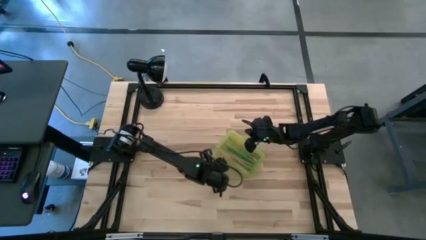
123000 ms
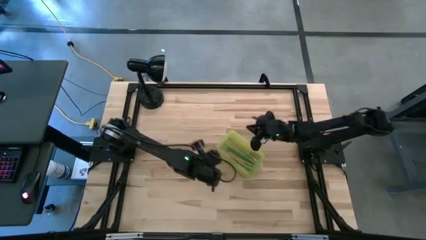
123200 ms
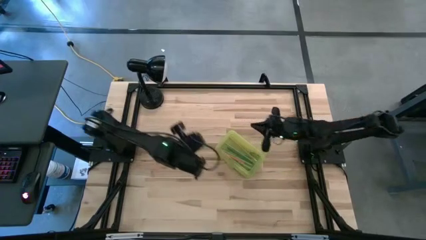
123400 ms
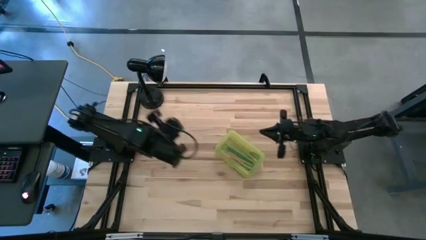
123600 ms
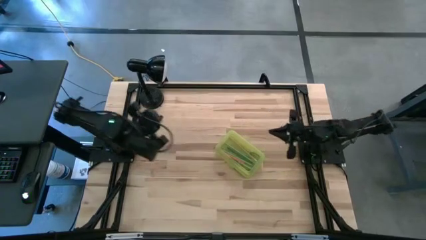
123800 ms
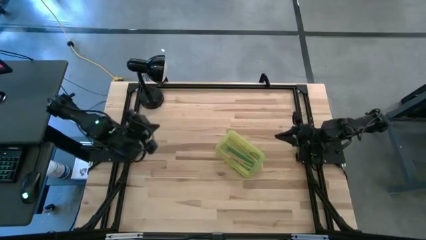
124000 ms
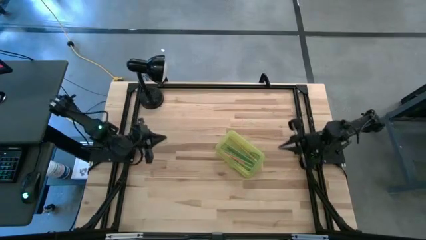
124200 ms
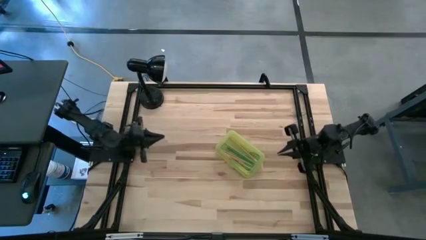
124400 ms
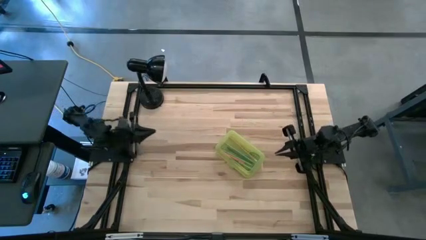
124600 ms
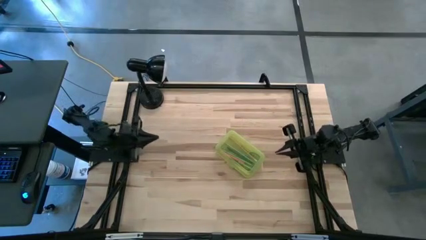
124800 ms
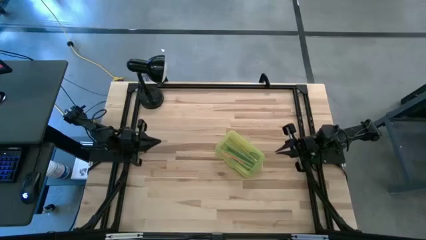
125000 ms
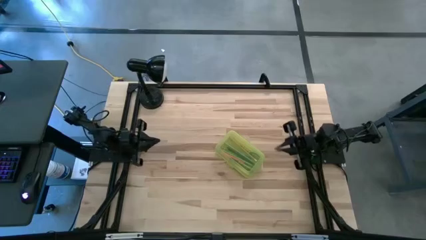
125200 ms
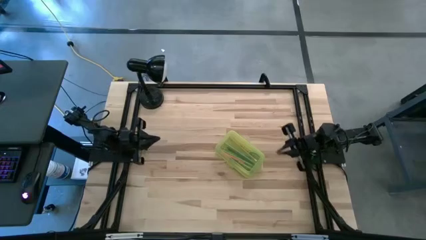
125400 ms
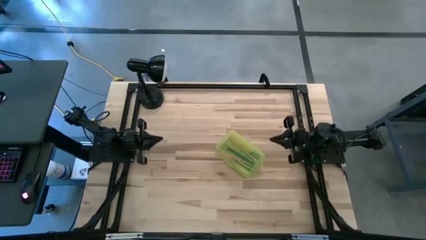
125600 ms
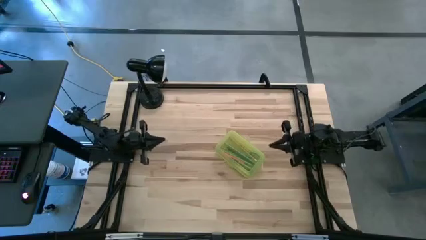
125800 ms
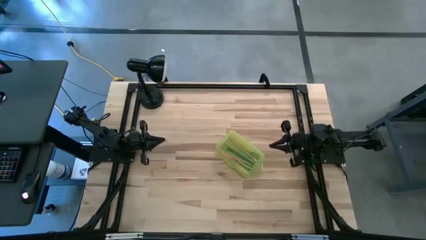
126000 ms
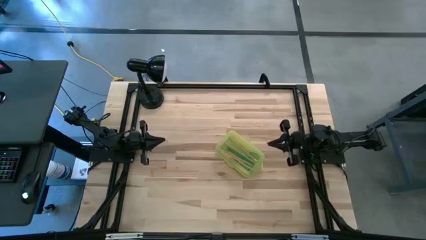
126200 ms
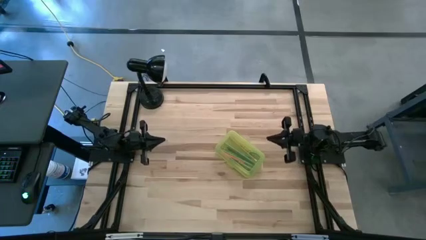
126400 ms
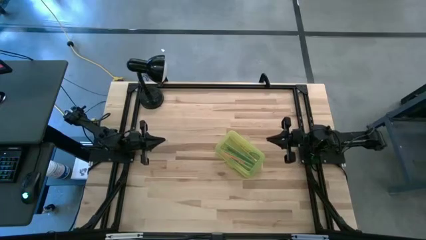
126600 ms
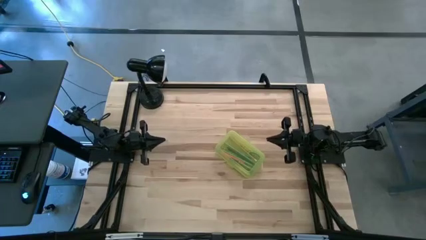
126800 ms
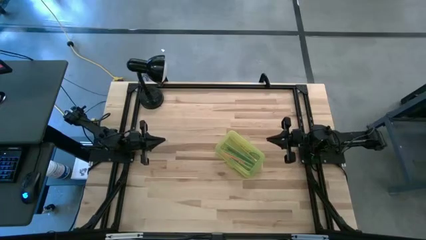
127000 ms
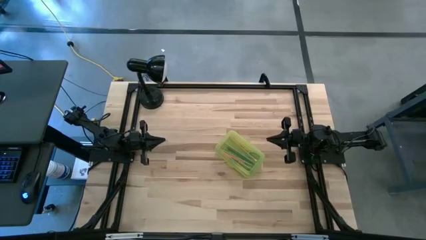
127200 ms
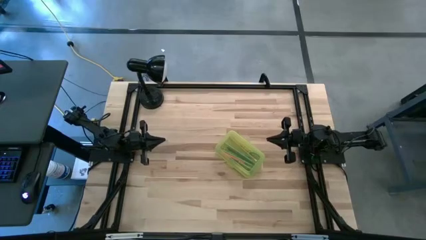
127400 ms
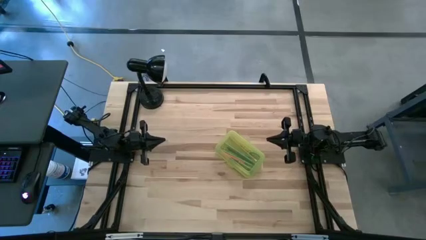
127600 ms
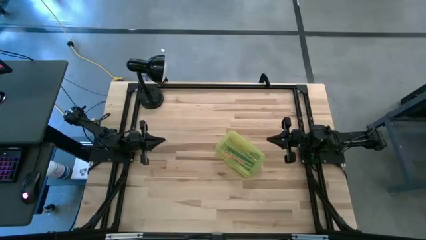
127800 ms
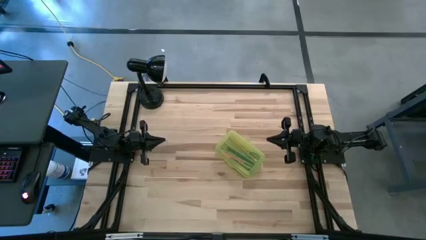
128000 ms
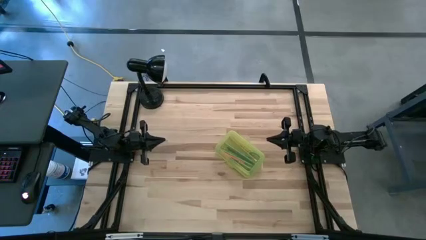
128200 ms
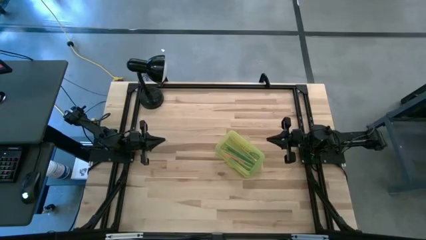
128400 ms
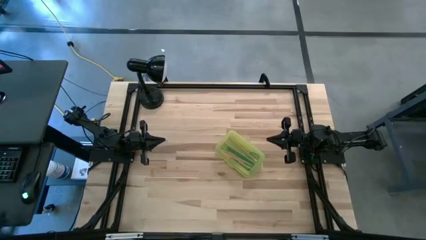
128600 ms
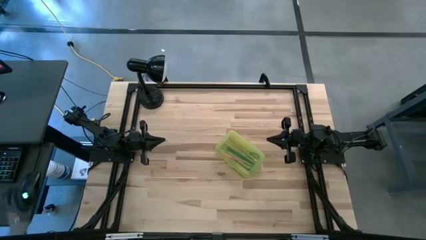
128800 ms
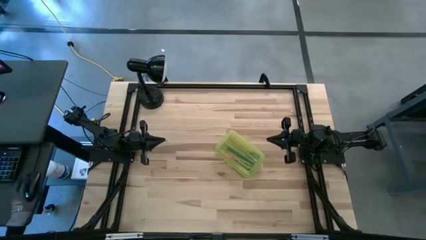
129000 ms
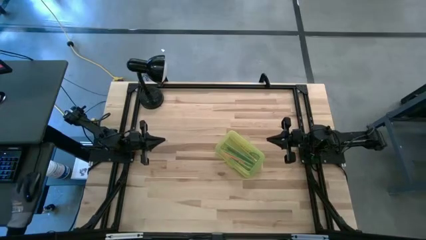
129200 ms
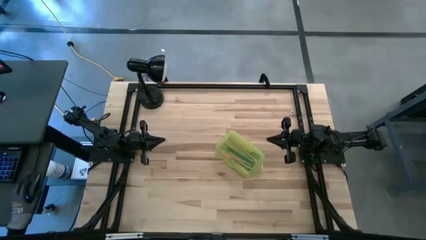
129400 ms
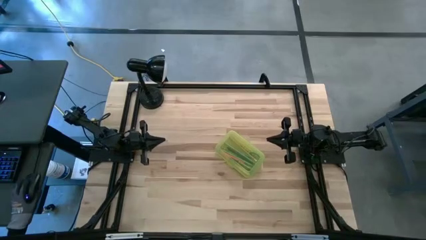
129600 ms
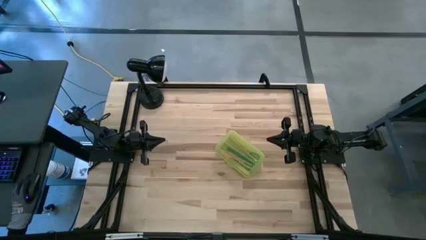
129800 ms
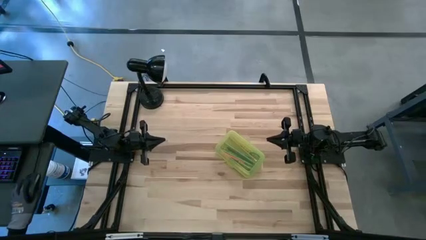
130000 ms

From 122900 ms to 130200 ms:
Task: Pick & place school supplies into a supply box
Return to Home Position

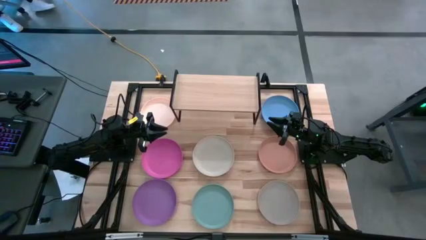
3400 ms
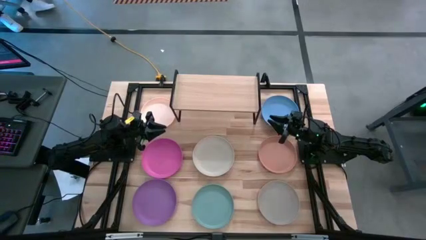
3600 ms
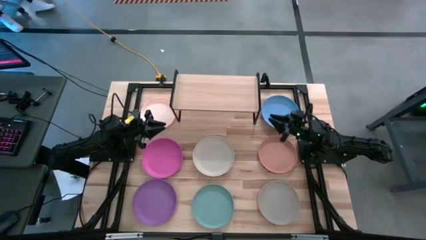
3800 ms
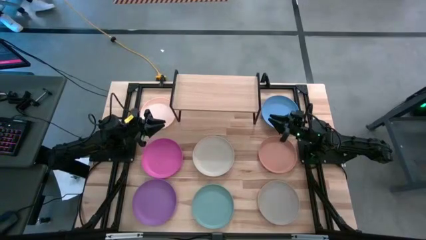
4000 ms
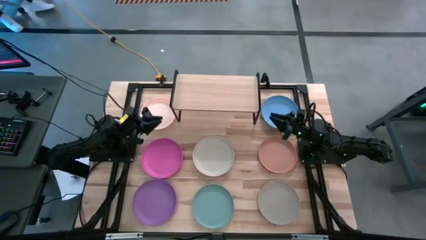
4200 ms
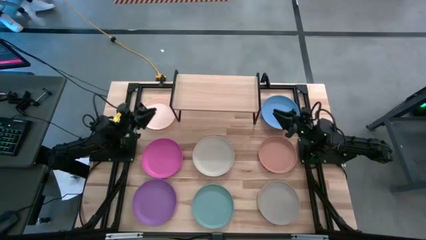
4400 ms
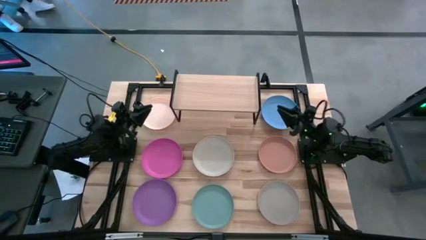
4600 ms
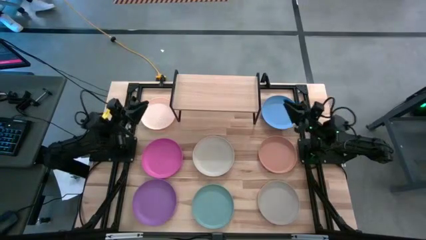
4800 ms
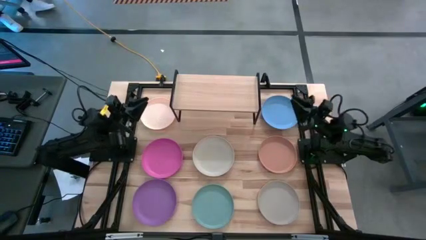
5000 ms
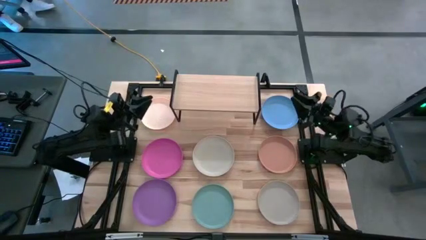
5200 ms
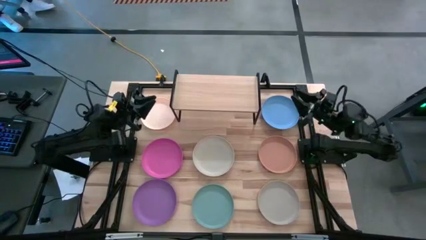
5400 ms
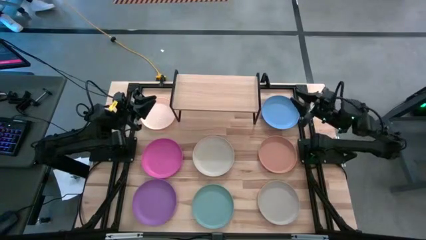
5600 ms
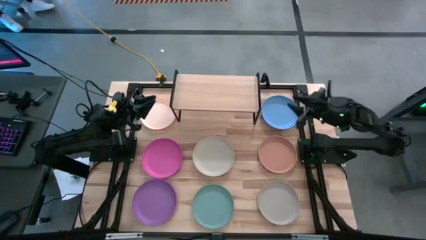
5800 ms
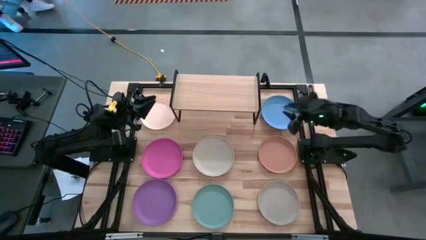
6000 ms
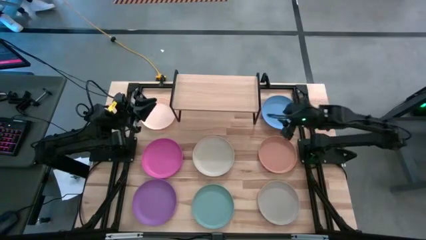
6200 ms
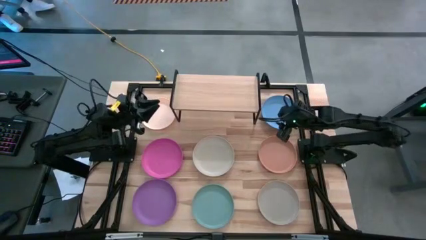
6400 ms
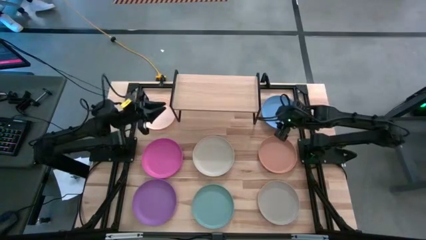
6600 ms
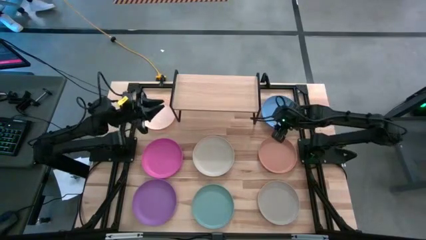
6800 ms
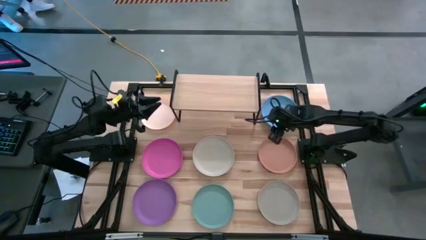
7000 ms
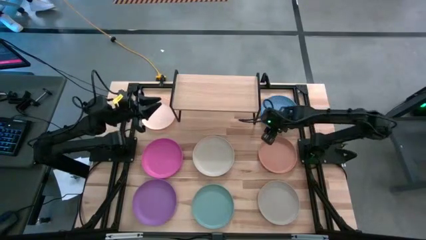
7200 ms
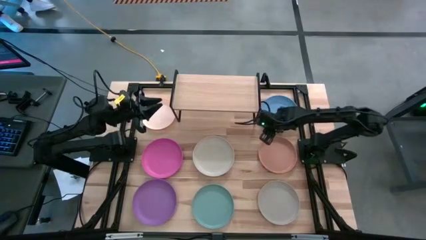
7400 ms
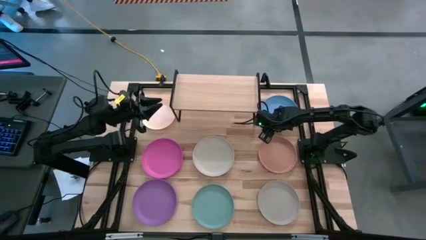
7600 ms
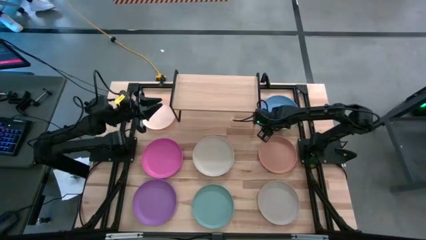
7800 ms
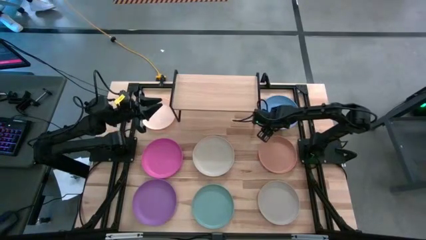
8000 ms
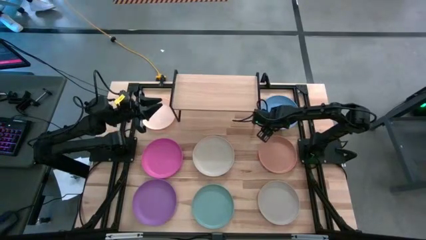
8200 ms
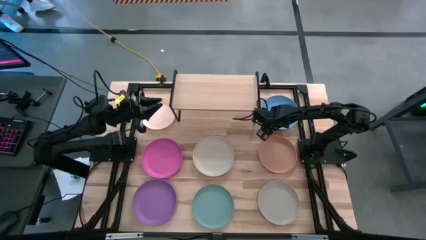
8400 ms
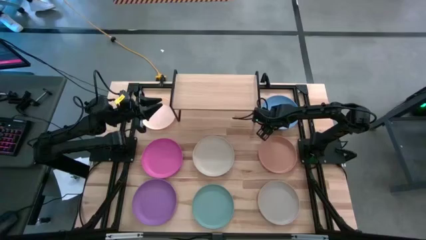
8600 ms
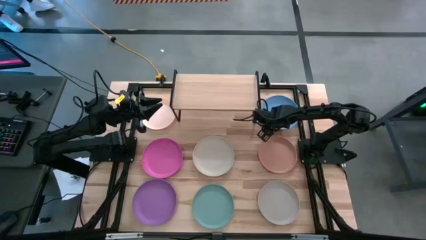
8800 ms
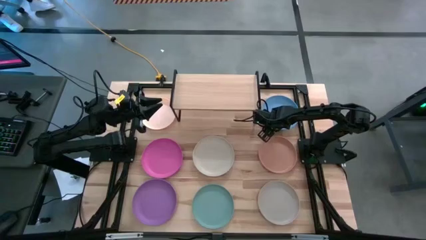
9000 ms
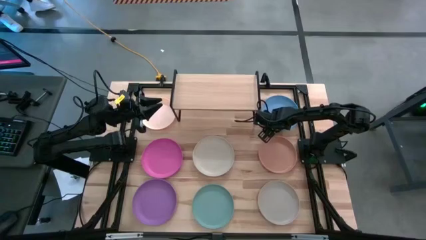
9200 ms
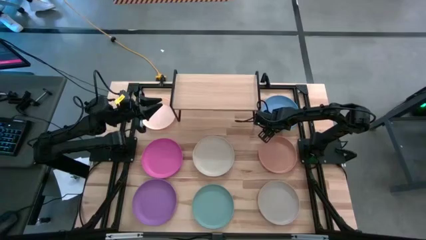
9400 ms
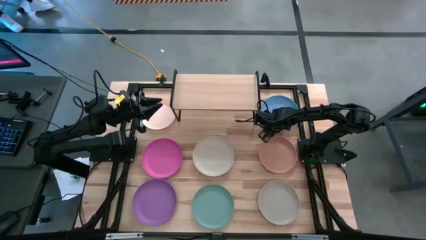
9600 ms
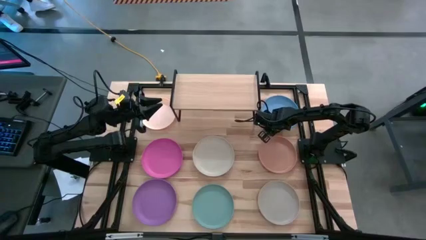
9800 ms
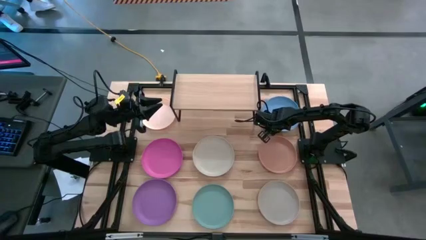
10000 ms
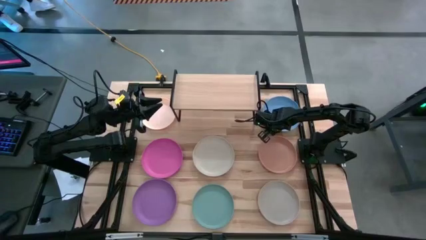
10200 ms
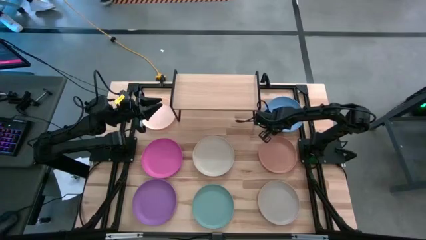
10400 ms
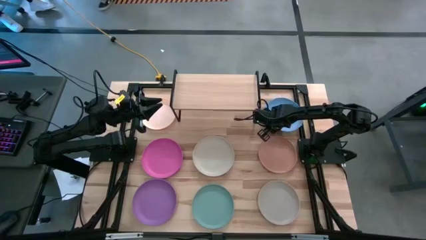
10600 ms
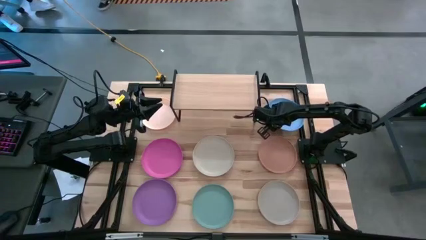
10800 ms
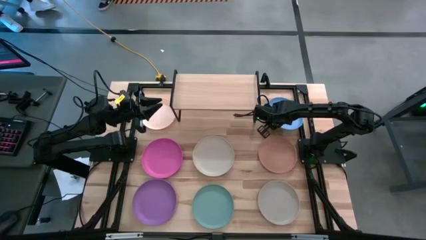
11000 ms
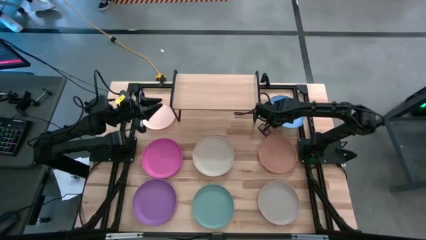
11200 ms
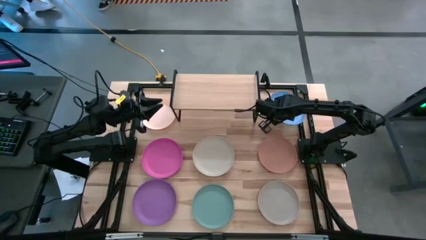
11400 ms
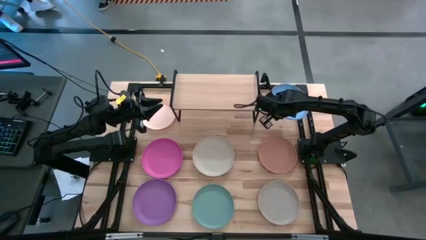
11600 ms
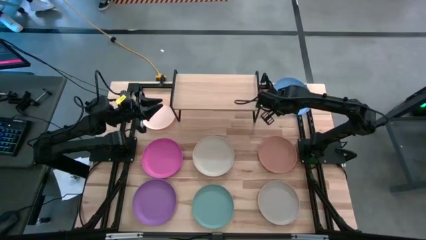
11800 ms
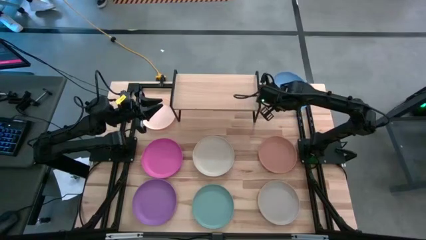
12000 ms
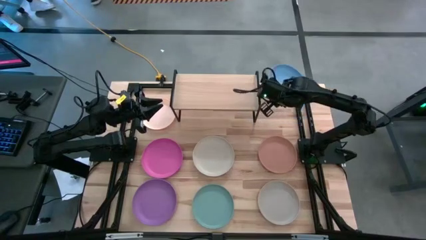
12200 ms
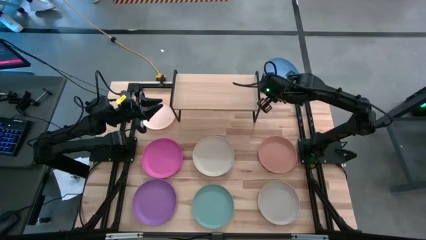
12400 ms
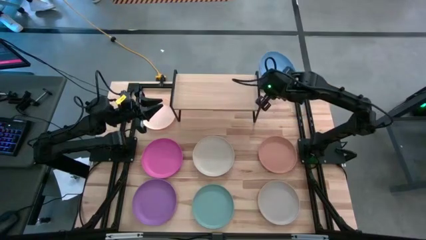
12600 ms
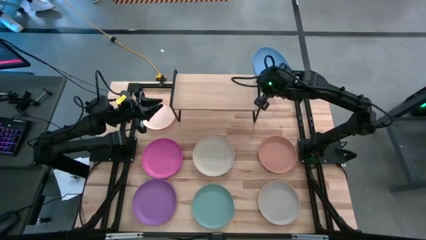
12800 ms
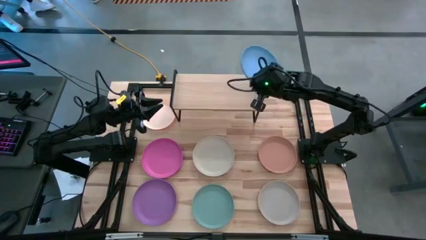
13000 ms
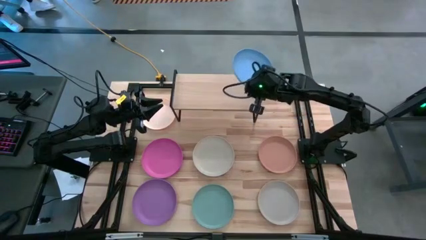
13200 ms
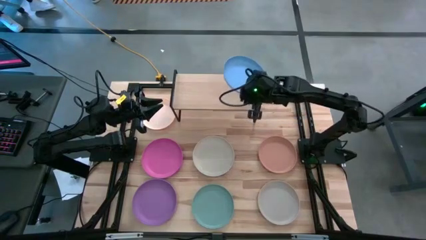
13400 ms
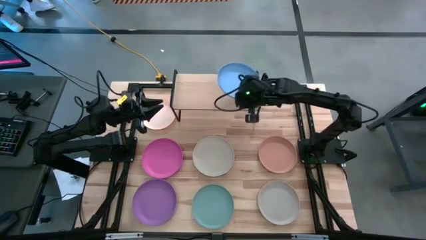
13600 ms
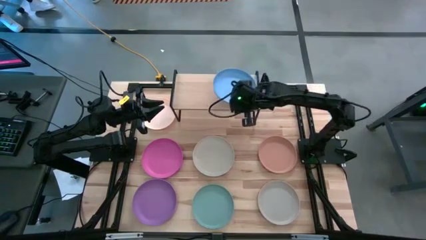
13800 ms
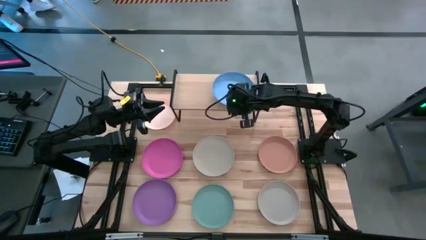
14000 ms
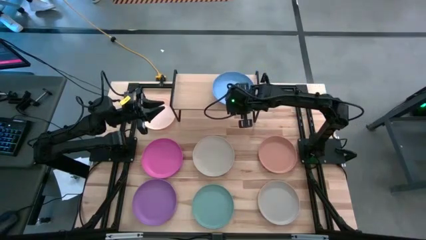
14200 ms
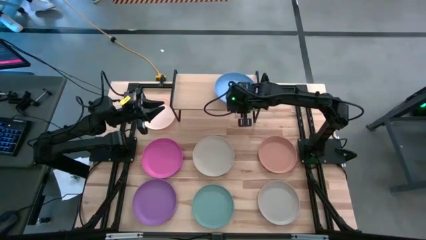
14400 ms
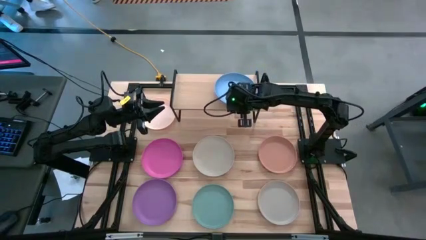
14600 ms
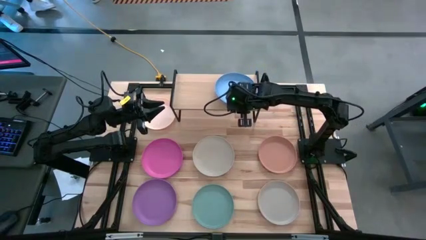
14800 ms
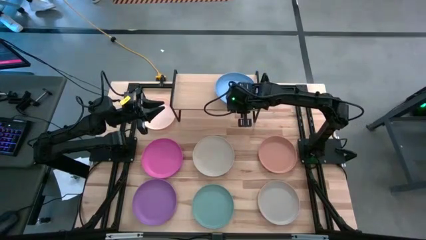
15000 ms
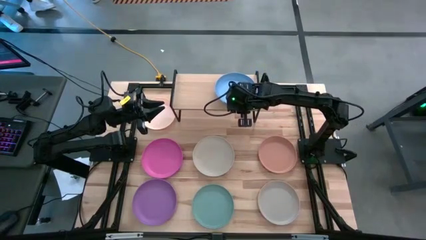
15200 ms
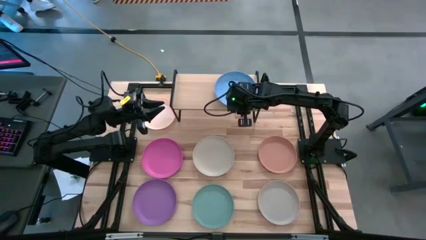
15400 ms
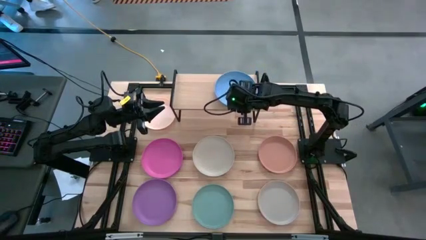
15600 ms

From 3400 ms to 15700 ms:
Task: Place and stack plates onto a shelf
Put the blue plate on the shelf
